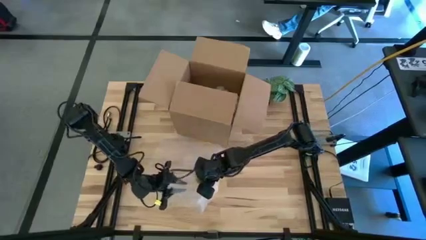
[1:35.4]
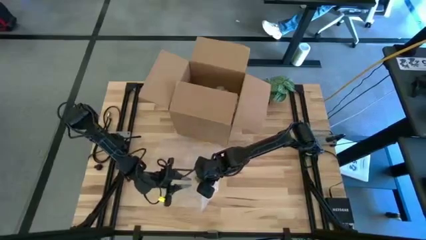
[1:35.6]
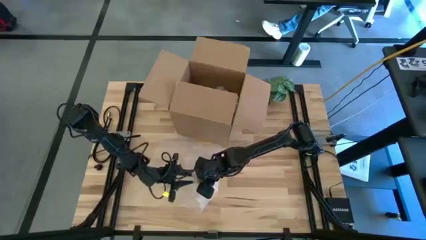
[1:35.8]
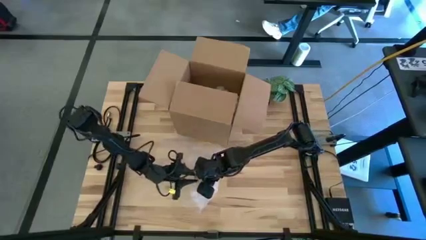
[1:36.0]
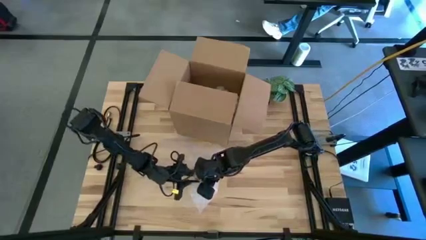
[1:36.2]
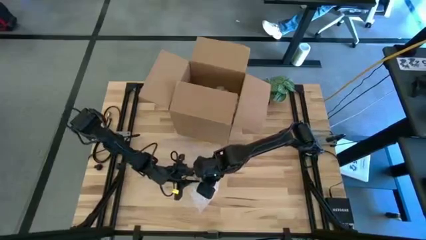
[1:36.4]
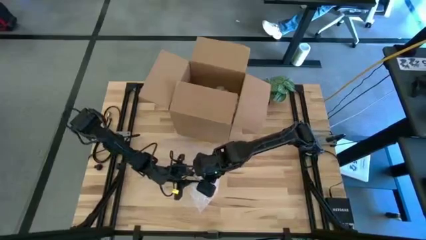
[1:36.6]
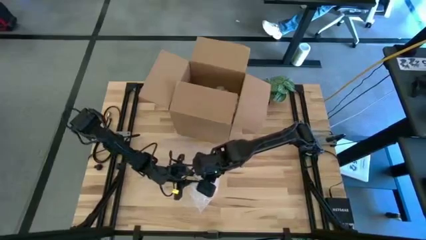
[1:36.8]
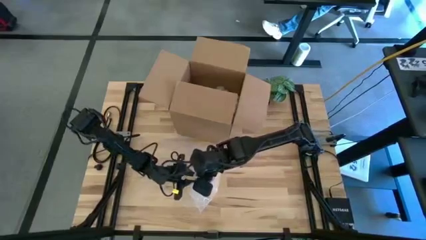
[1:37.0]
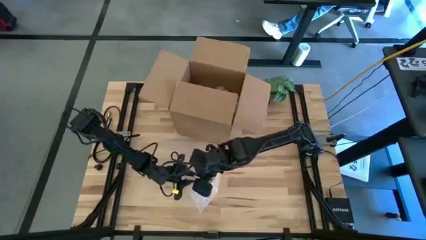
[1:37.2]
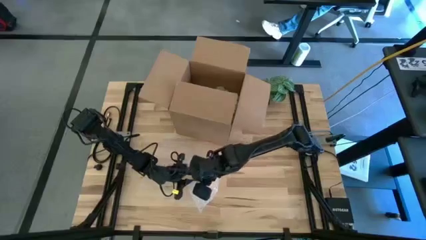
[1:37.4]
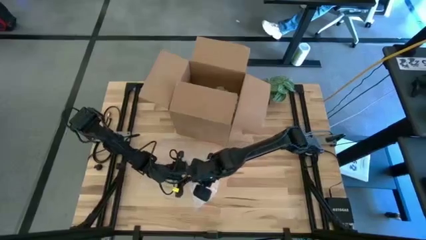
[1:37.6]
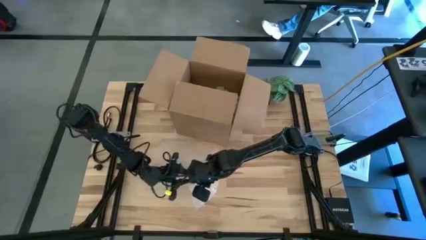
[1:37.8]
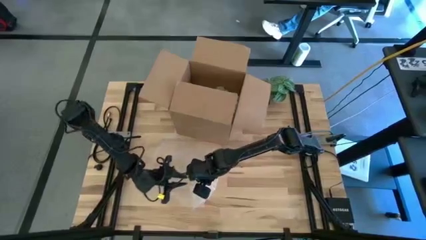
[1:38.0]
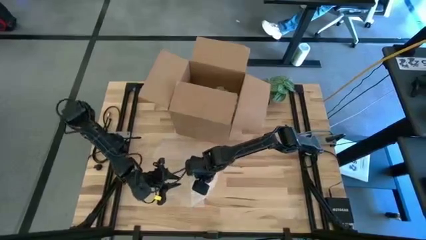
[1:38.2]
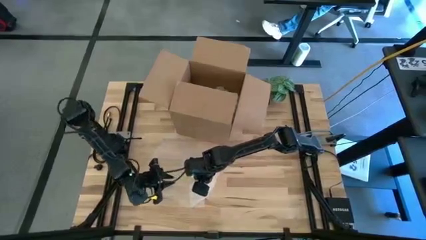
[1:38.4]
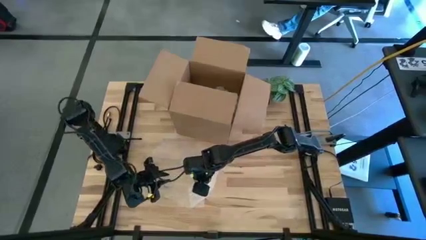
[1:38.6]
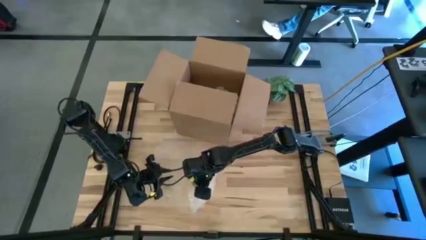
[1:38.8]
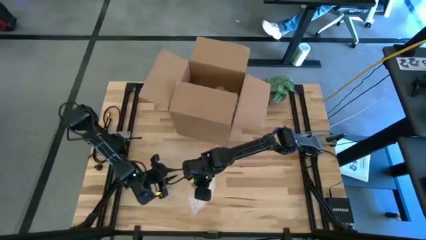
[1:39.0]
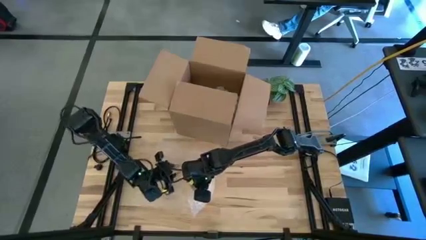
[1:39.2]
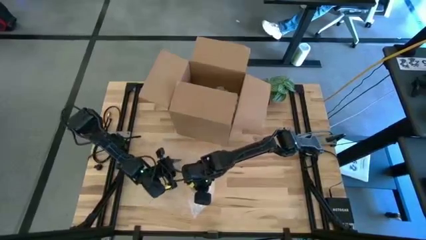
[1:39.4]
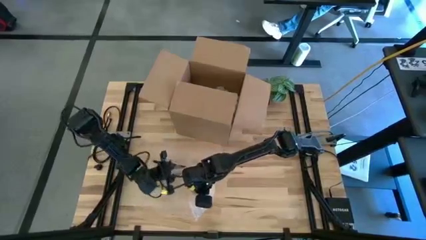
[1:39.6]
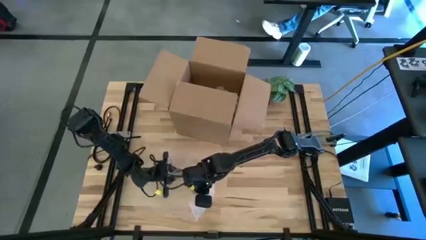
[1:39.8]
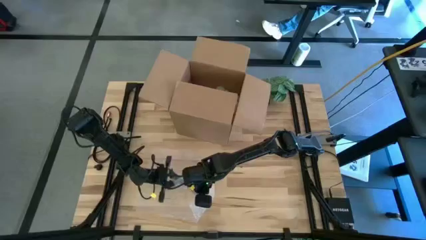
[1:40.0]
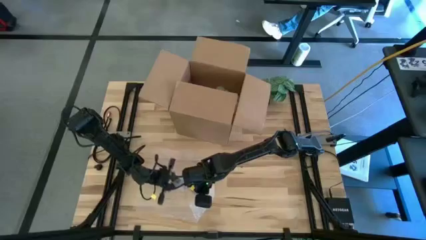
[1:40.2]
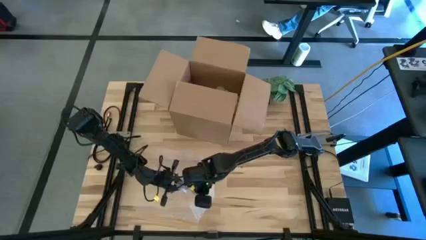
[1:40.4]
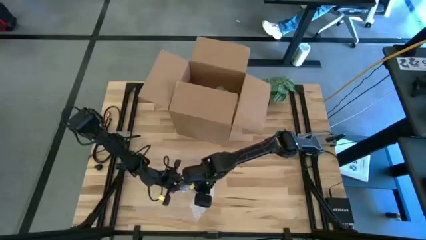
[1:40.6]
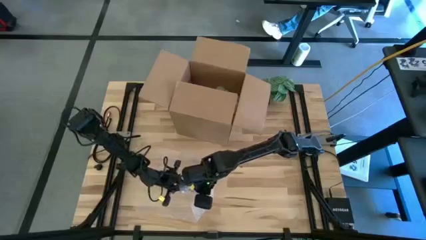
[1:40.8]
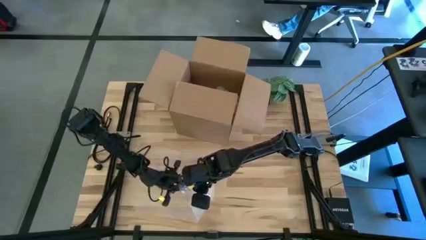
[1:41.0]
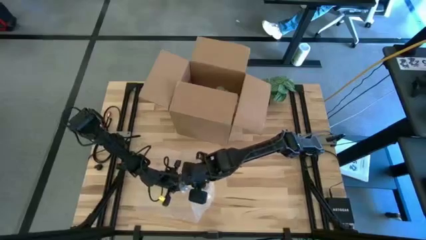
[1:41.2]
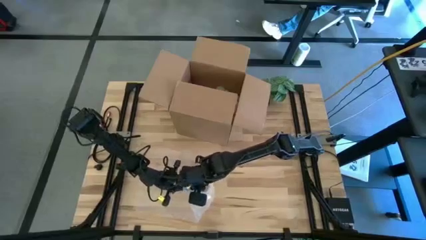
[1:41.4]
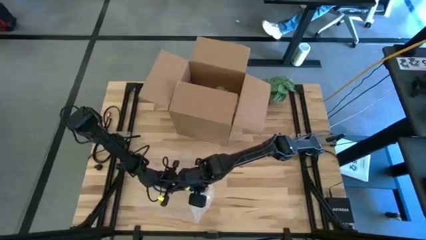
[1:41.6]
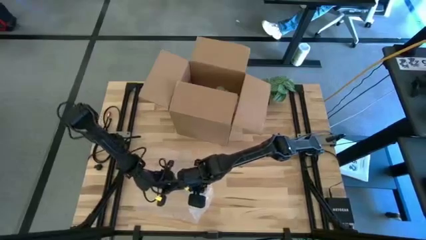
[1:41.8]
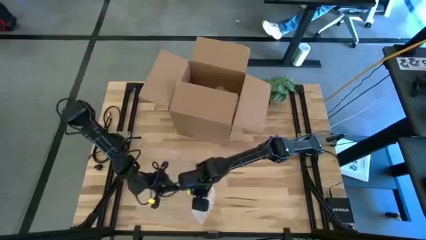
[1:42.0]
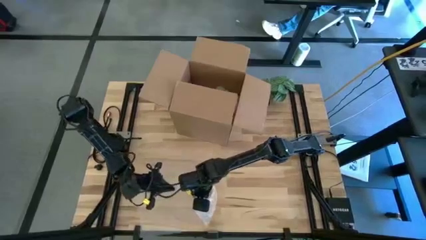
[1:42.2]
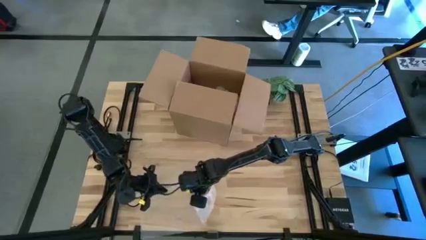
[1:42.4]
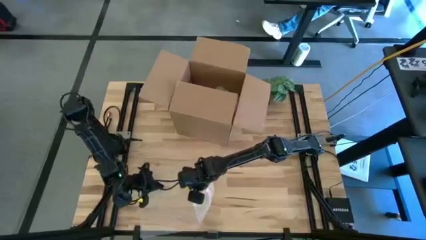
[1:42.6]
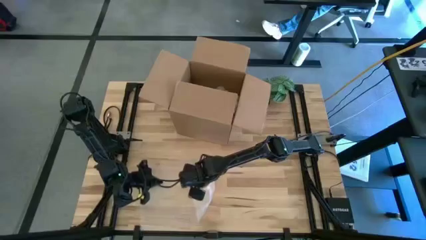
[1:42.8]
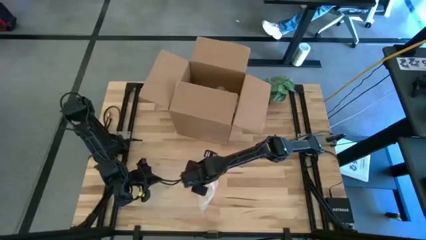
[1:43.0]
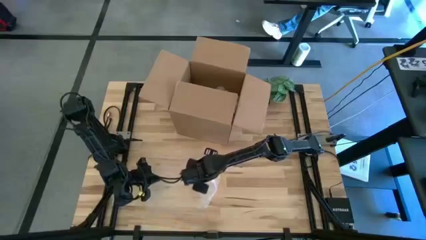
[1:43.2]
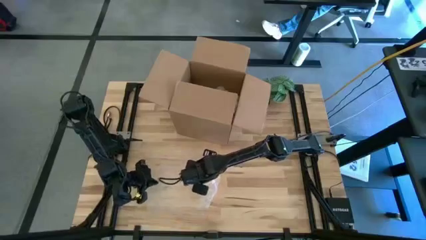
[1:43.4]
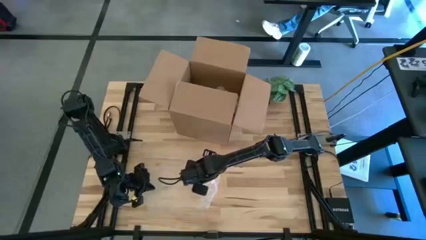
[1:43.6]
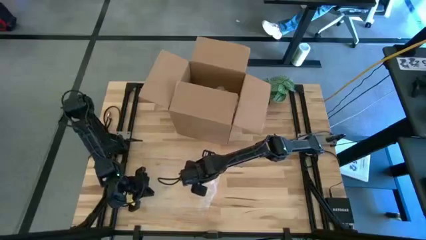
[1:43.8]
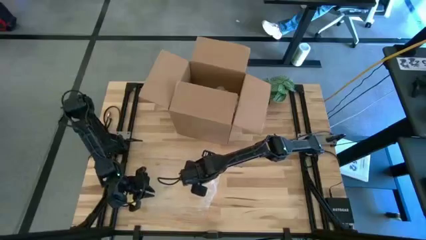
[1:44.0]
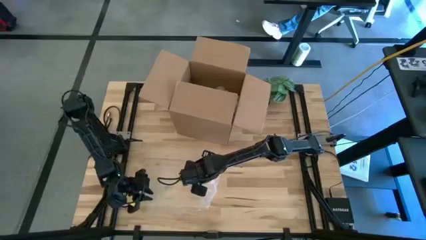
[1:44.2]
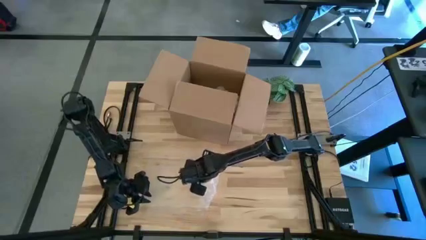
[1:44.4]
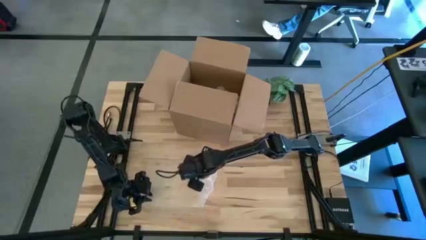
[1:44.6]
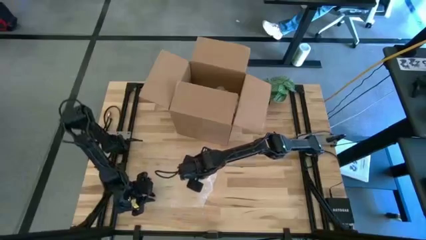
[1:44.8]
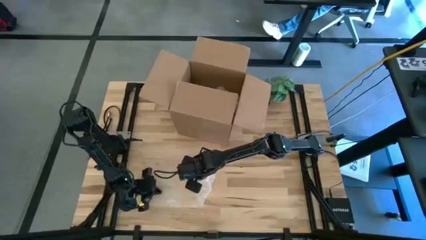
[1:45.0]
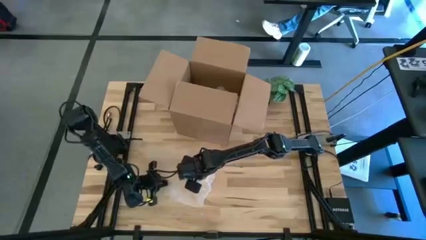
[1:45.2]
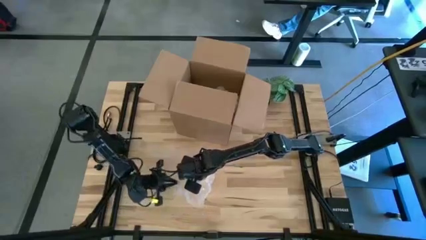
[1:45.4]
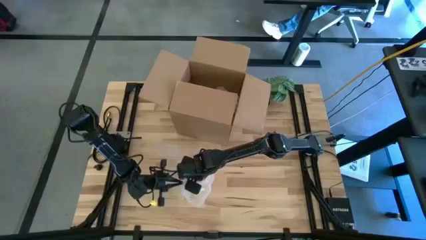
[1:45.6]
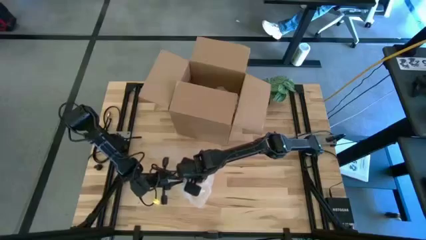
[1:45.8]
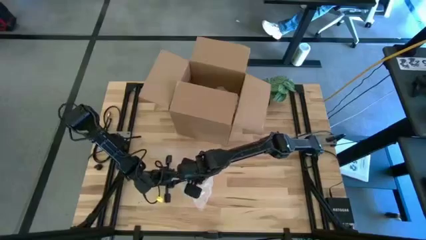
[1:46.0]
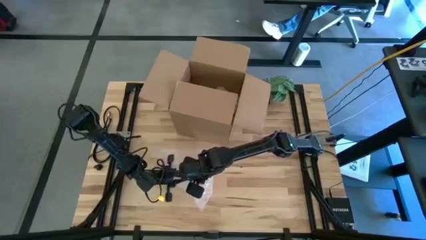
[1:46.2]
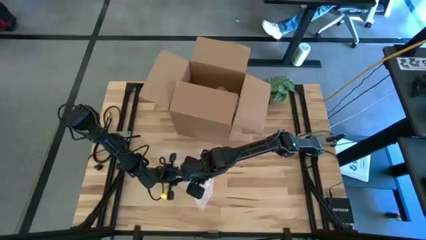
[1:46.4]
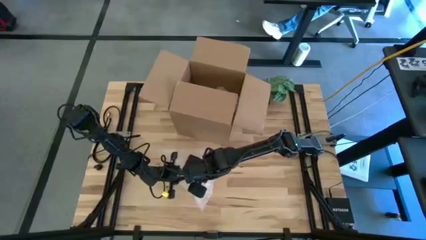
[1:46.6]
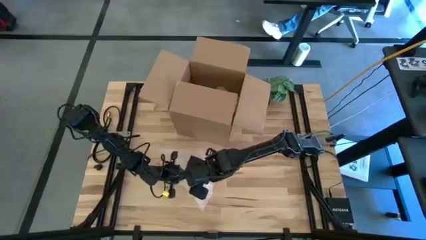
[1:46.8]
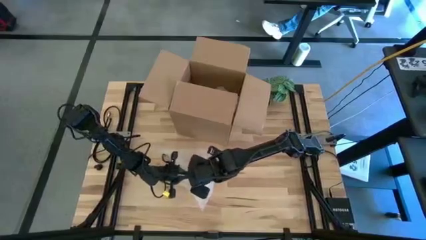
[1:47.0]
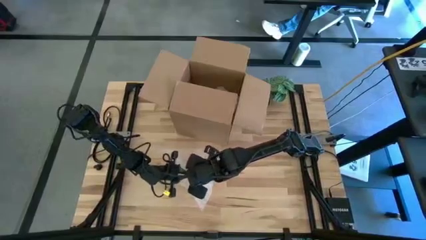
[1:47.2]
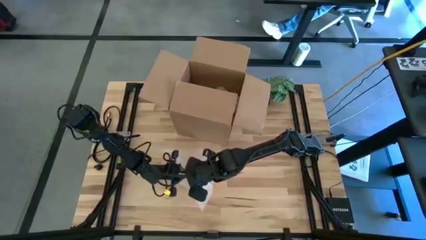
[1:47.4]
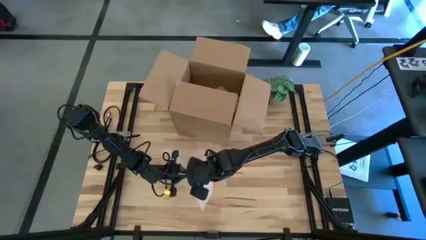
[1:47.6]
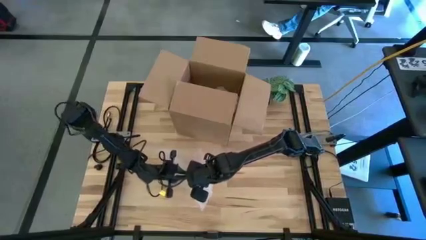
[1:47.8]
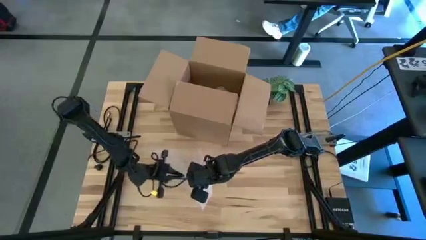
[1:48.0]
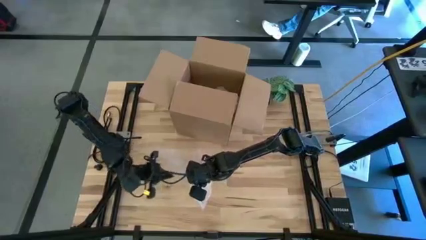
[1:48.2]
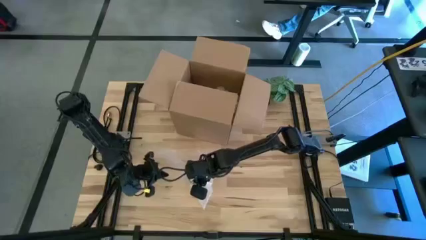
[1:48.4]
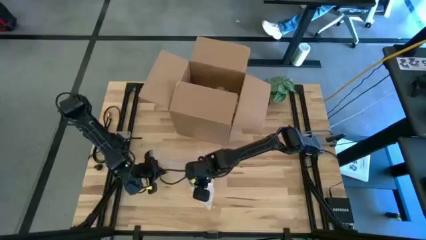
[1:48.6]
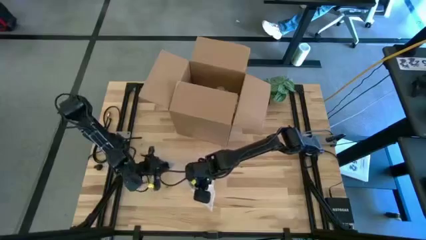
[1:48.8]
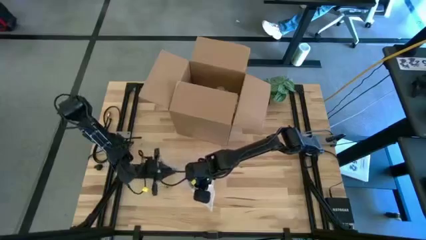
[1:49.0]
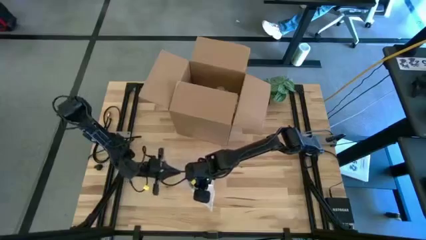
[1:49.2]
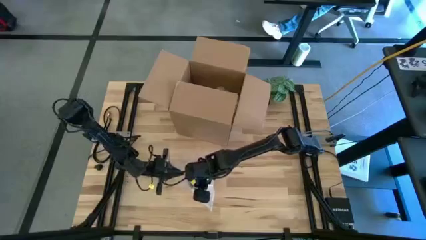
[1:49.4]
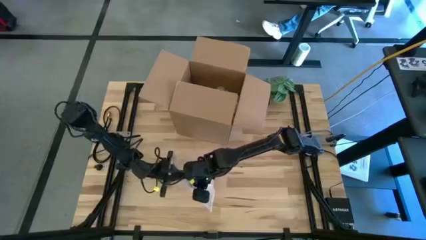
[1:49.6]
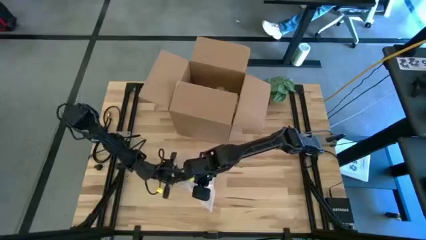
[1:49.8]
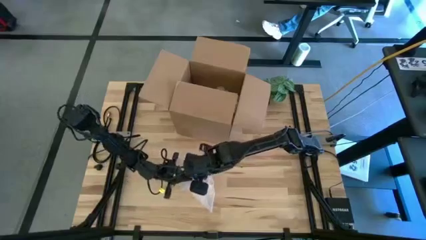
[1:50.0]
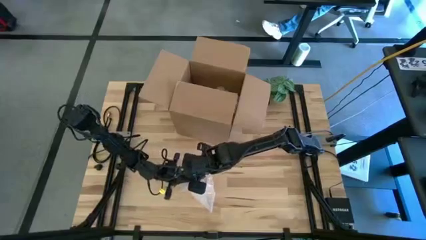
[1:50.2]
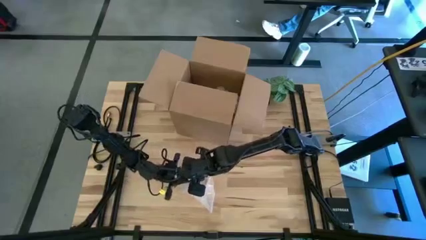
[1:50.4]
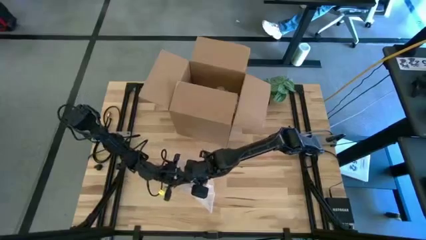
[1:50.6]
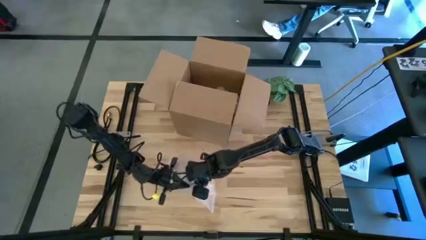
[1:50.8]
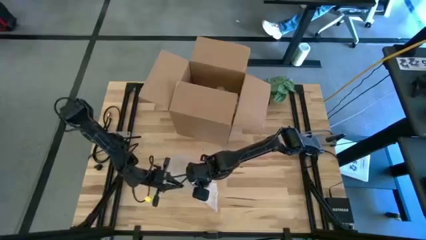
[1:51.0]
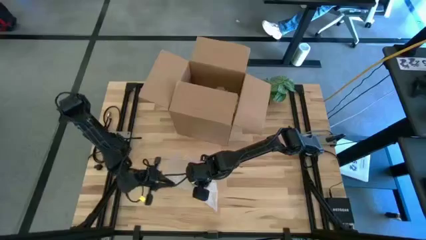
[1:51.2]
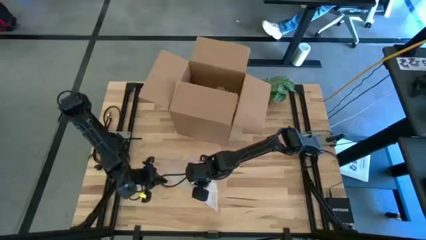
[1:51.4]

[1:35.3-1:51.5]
Task: wrap mug
Wrap the yellow mug with the bubble wrap
